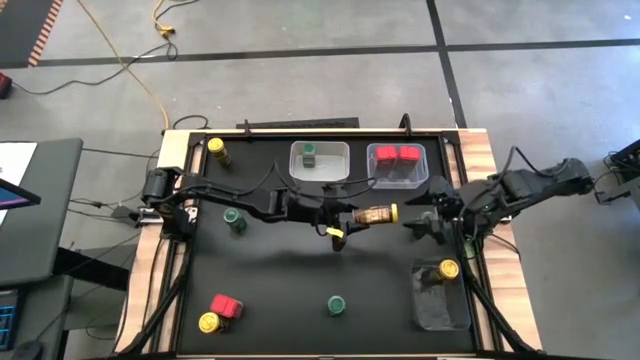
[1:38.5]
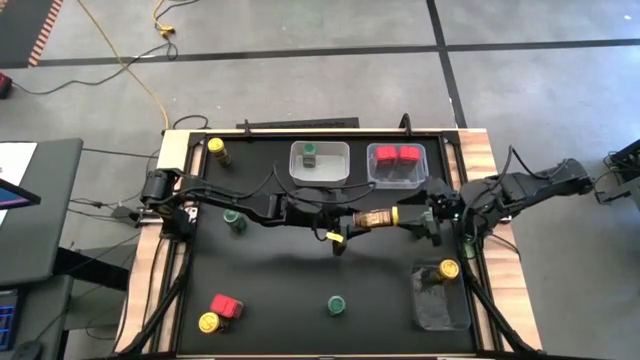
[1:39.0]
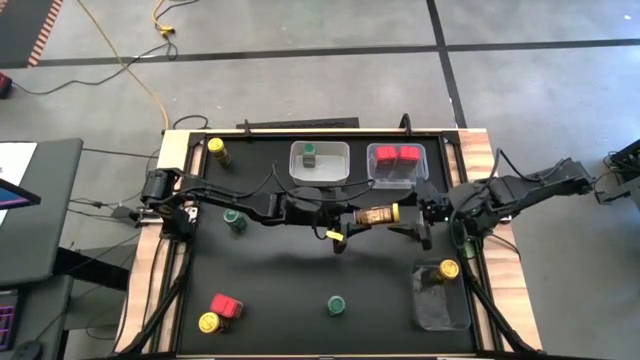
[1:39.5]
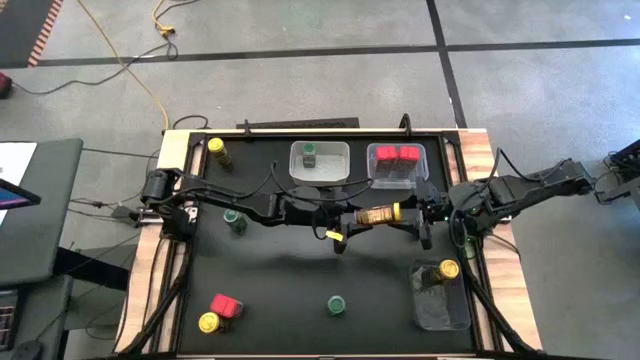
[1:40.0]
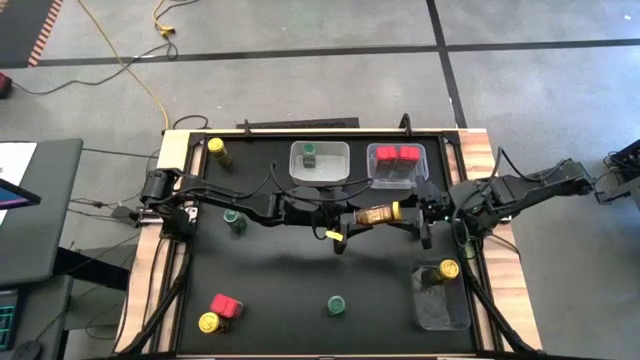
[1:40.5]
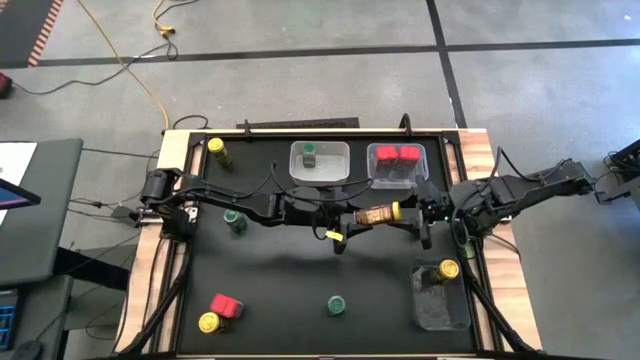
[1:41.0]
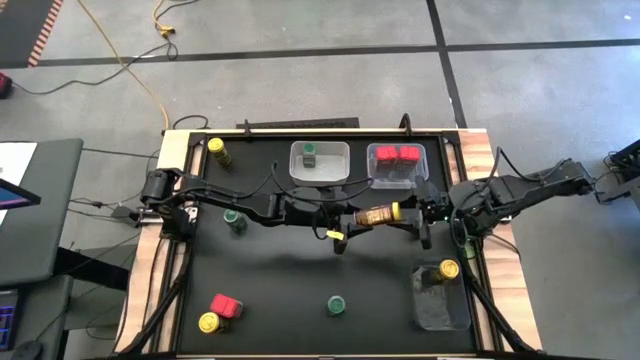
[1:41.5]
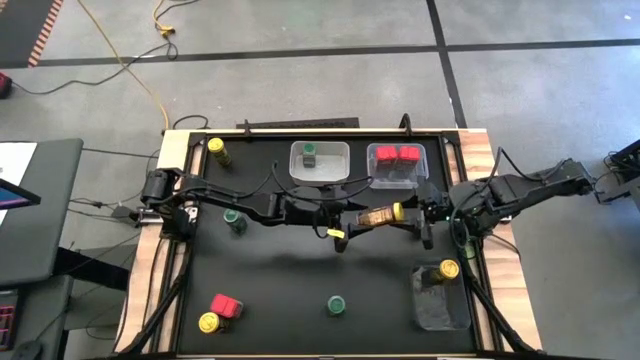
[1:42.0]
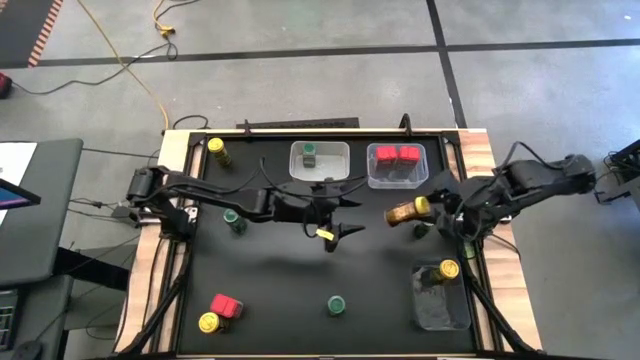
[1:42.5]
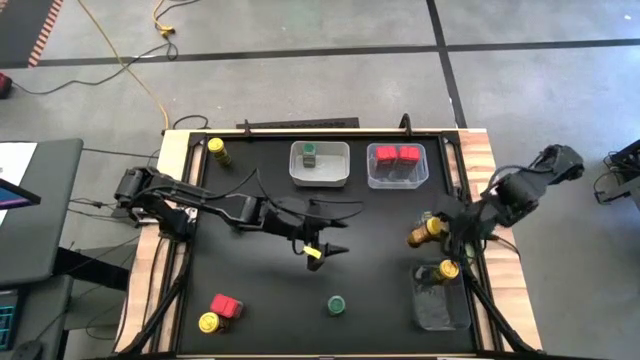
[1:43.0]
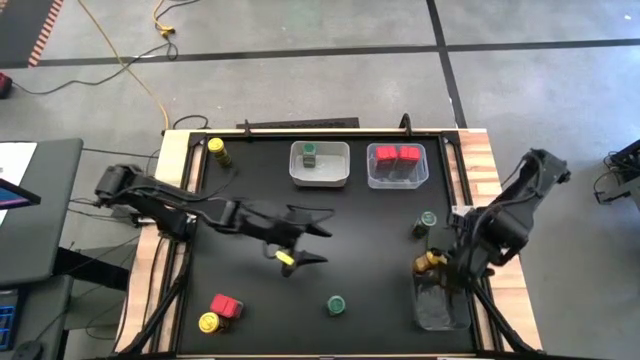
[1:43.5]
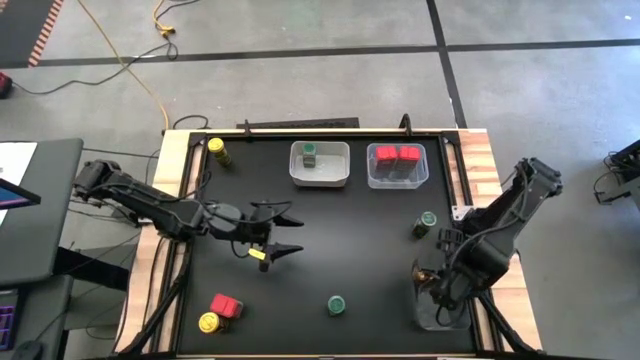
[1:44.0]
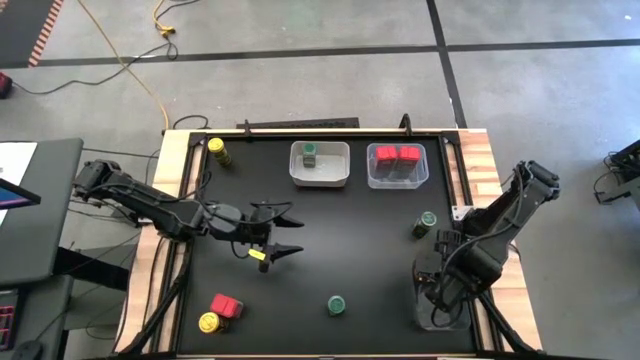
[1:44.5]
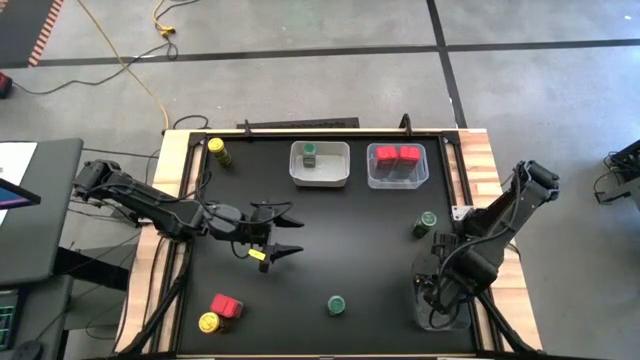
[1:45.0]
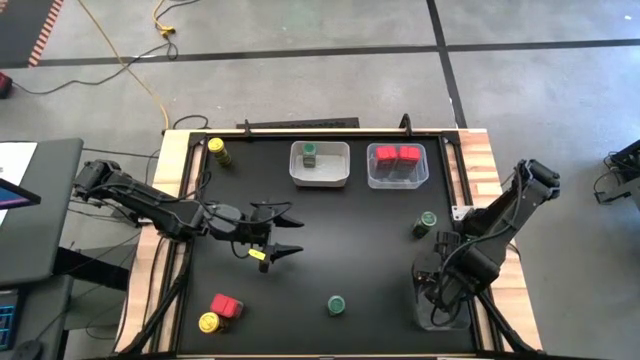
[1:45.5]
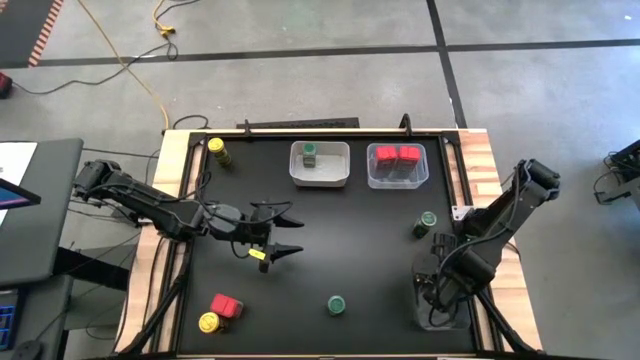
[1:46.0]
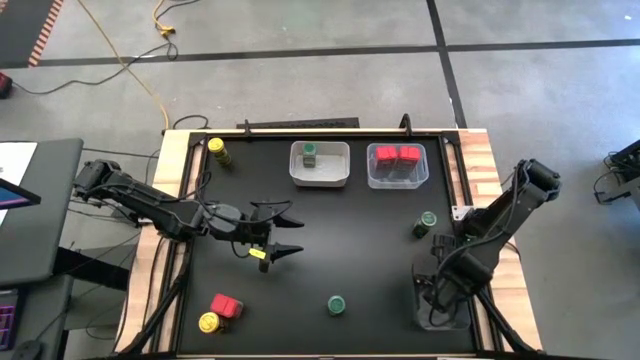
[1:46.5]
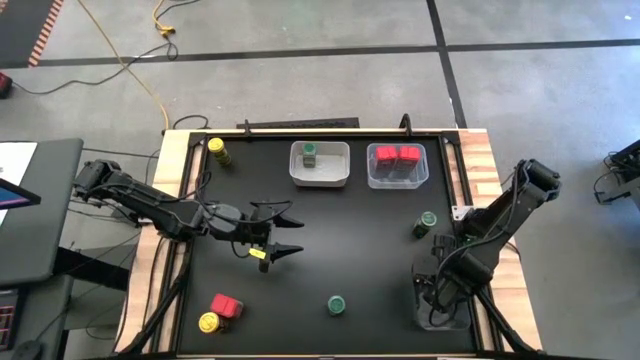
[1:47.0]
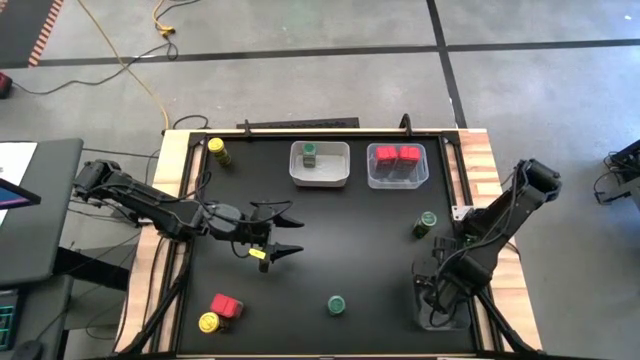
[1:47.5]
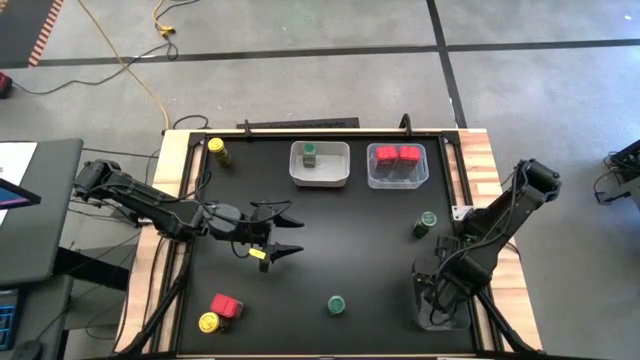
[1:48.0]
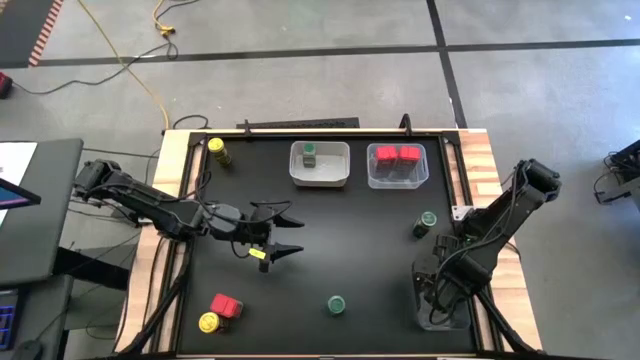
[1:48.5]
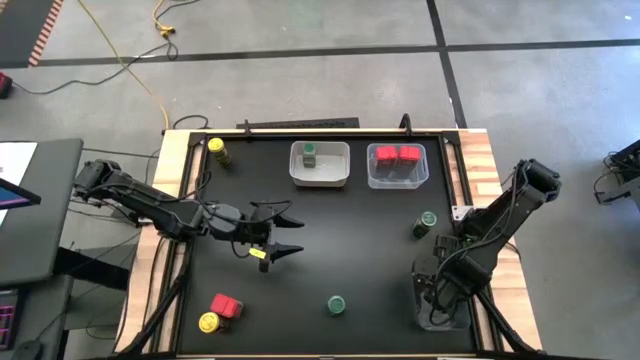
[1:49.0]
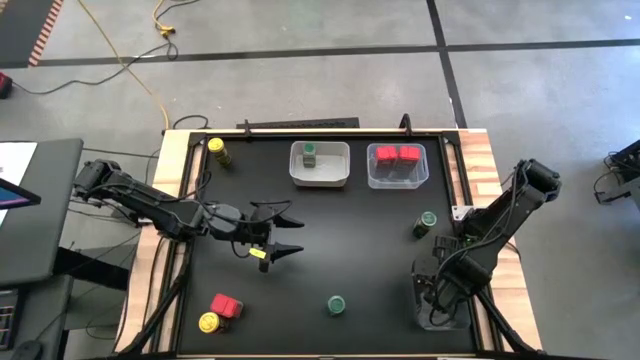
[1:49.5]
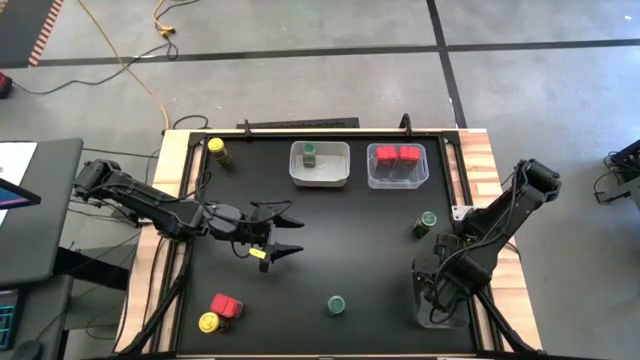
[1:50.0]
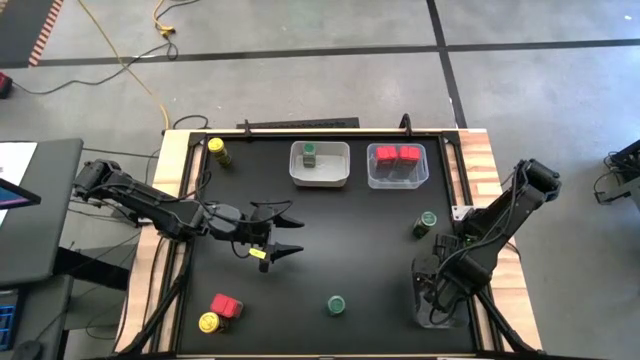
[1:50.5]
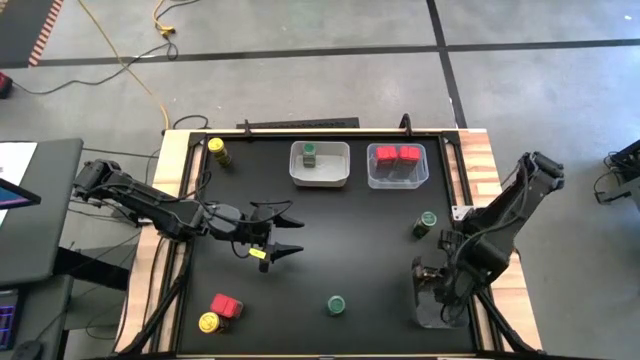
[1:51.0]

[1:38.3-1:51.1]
Task: Sort spices by type
Put the right yellow seasoning can into the black bin

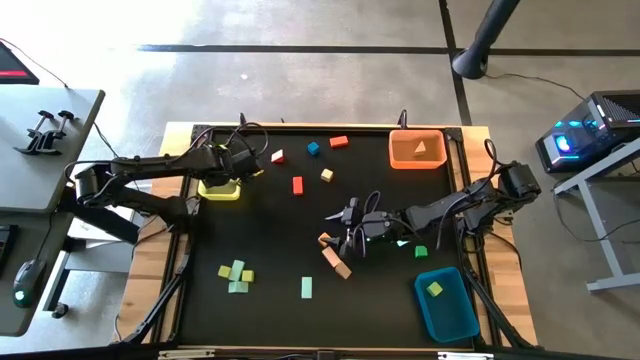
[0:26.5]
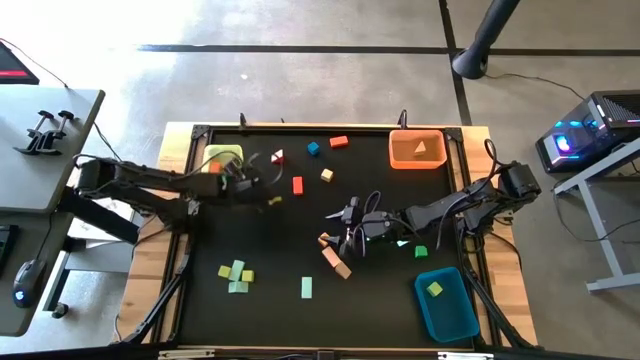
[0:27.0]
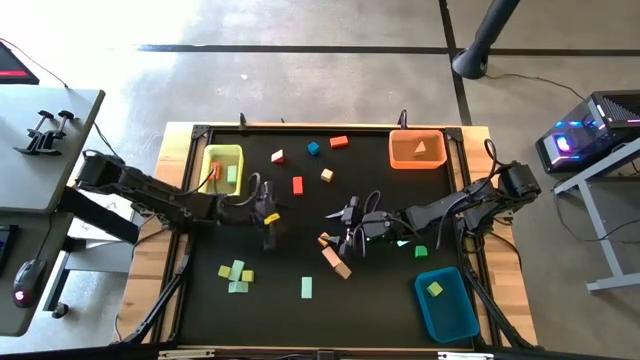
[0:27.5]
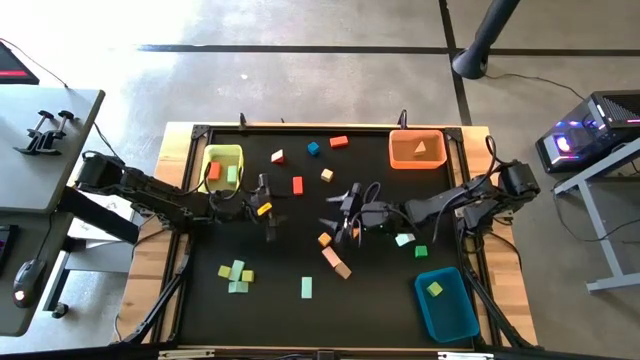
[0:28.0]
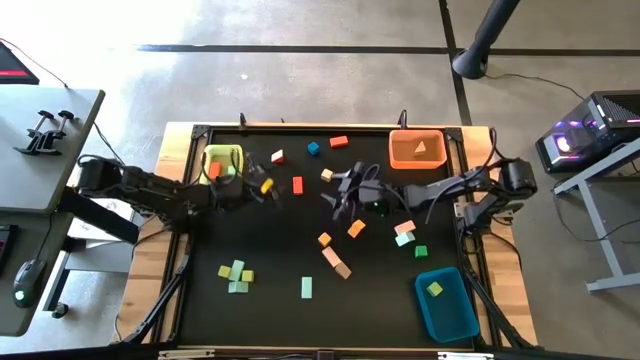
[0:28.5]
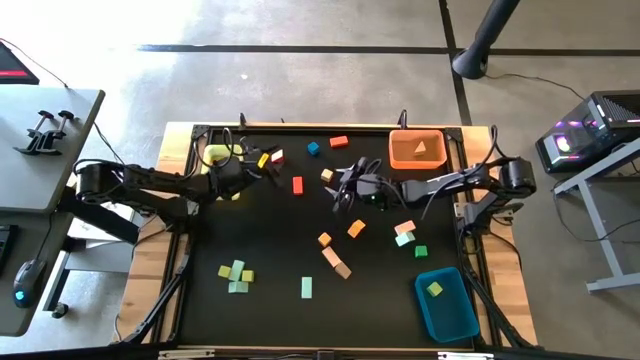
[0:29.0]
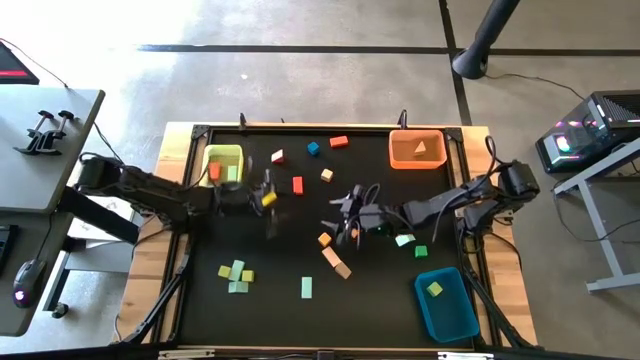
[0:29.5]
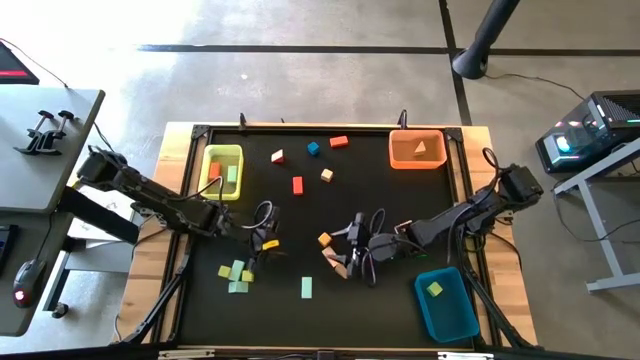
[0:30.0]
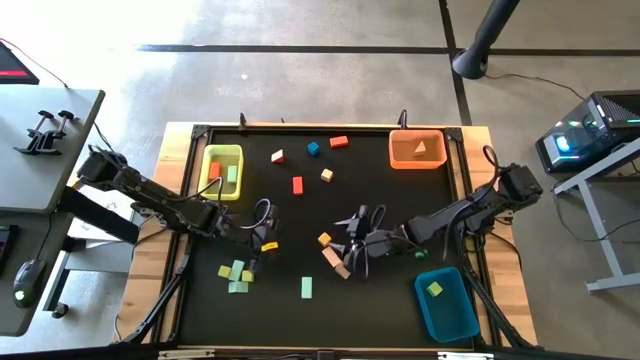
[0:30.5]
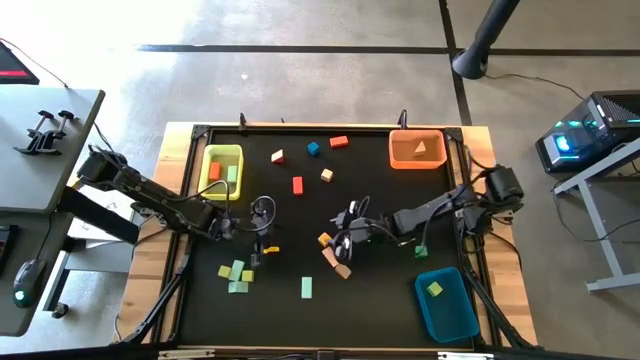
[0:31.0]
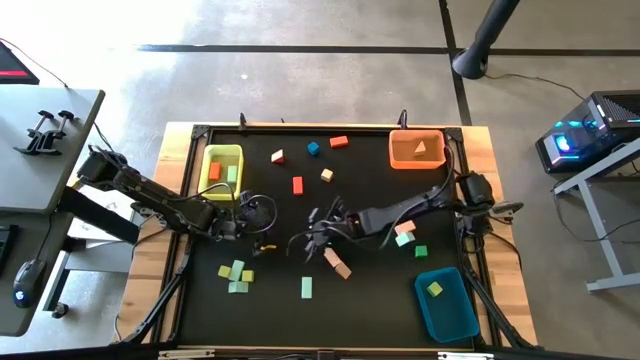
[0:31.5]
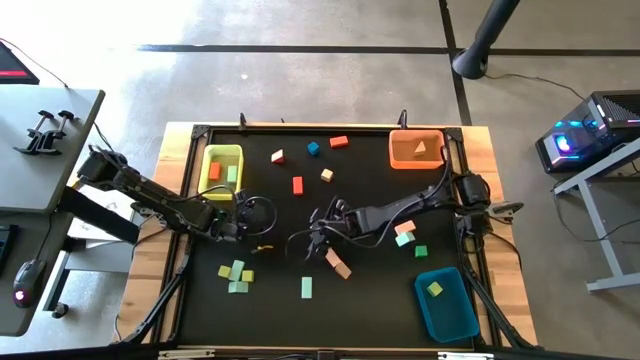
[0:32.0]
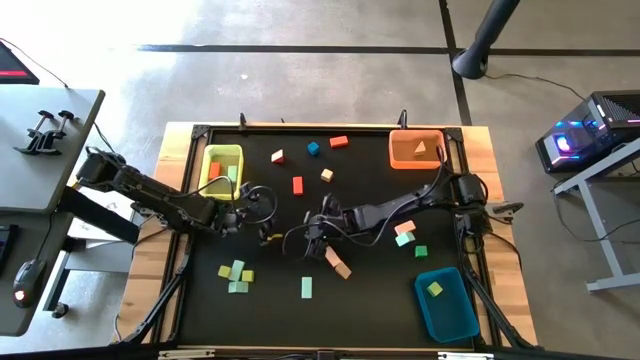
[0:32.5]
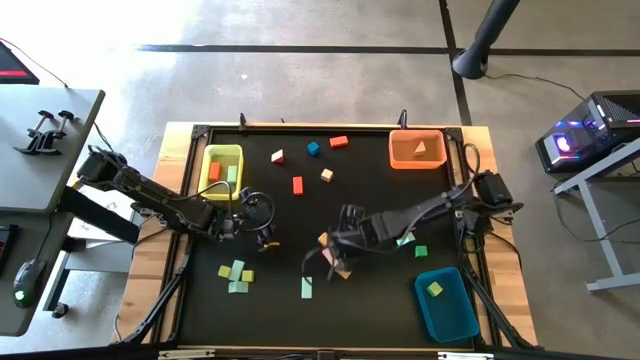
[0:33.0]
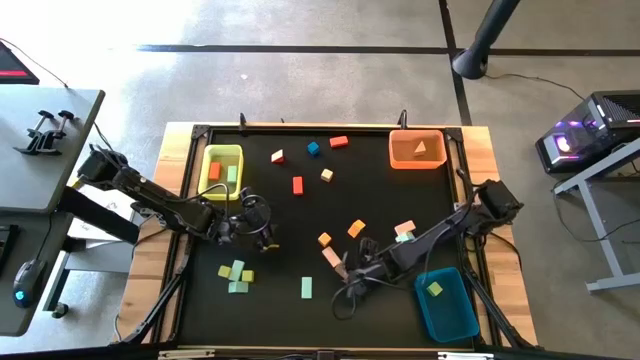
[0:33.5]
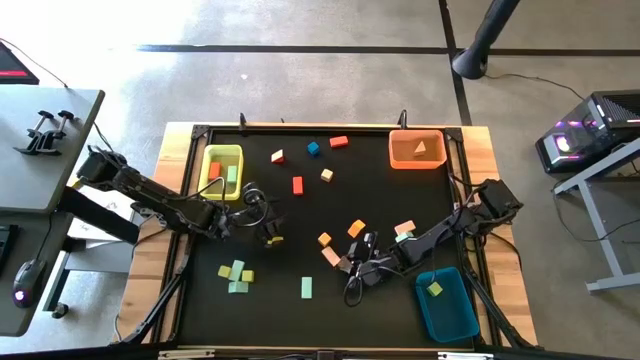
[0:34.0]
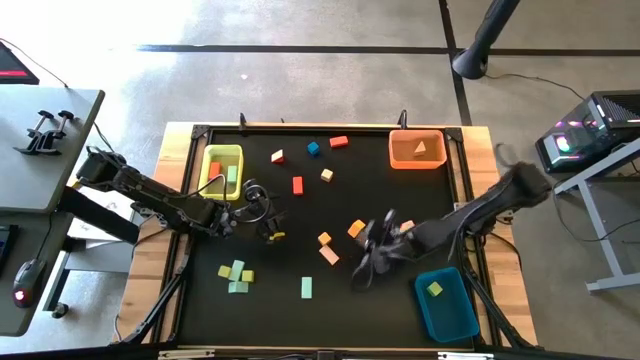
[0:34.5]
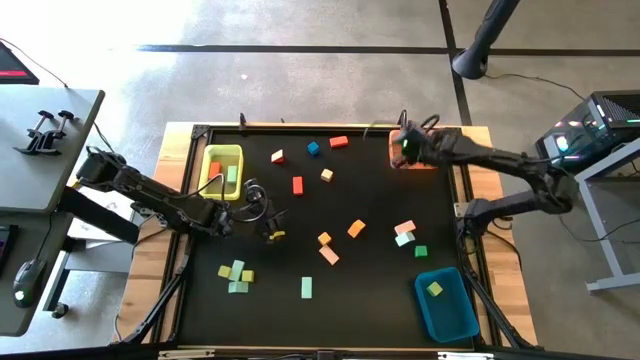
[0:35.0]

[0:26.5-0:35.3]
Task: Sort blocks by size
Put the light orange triangular block into the orange bin
